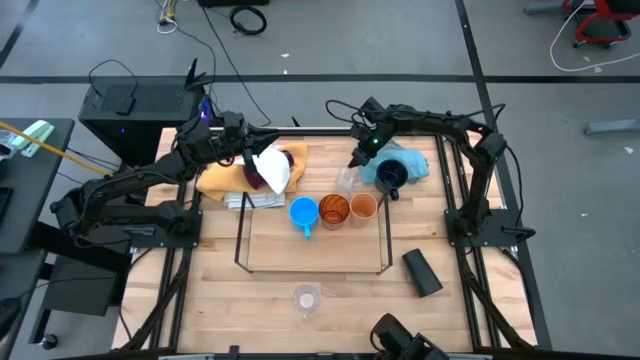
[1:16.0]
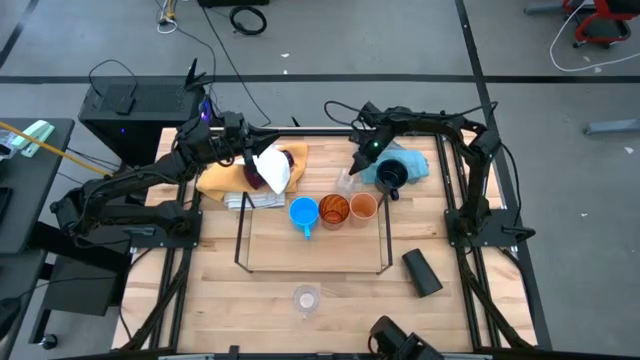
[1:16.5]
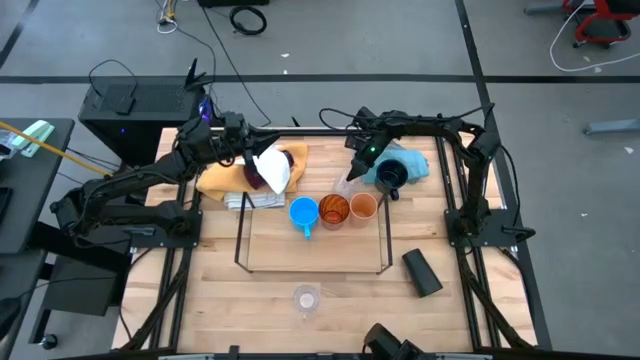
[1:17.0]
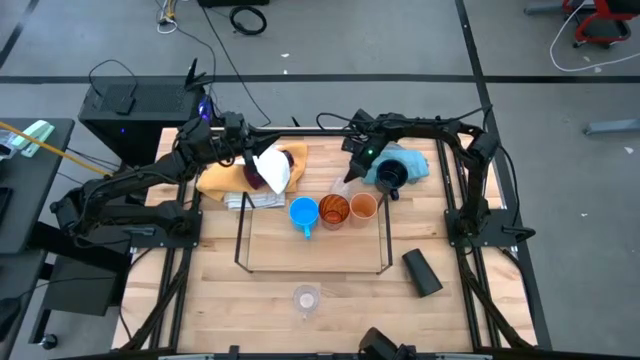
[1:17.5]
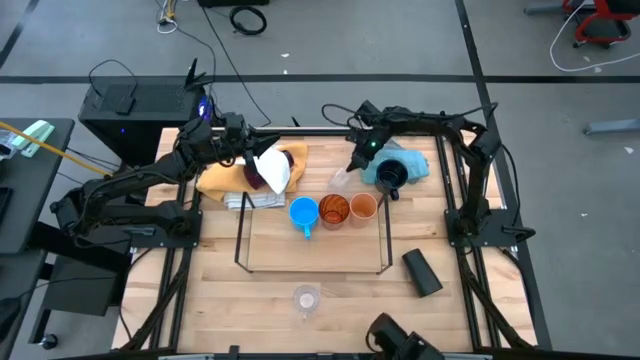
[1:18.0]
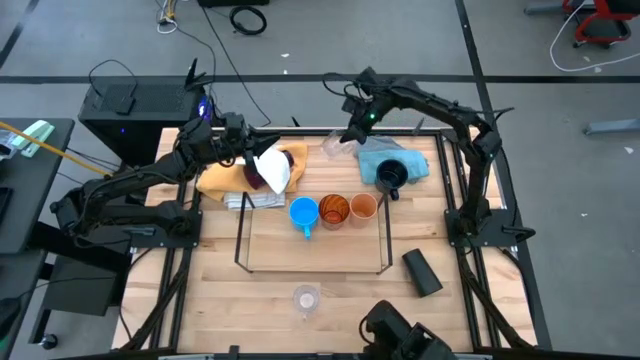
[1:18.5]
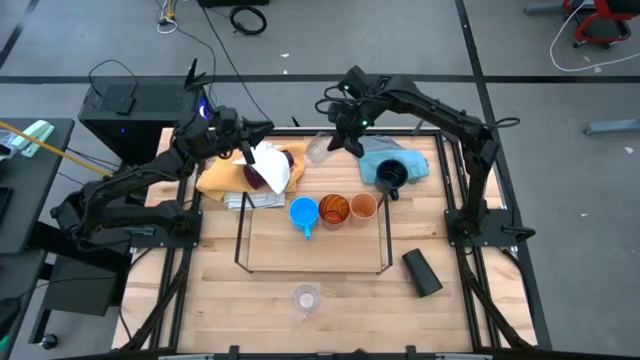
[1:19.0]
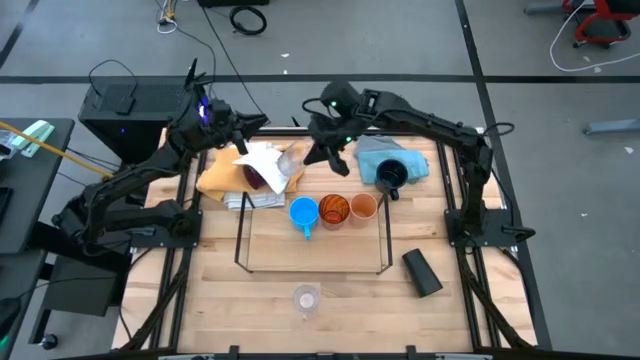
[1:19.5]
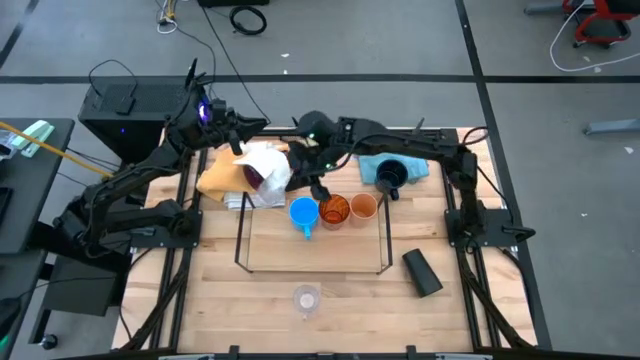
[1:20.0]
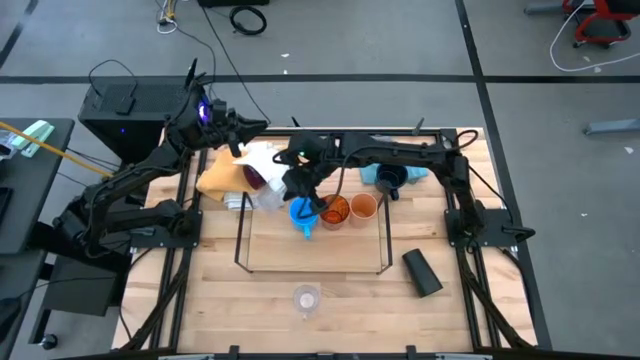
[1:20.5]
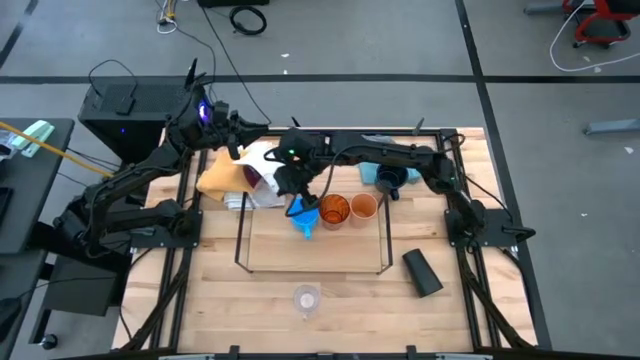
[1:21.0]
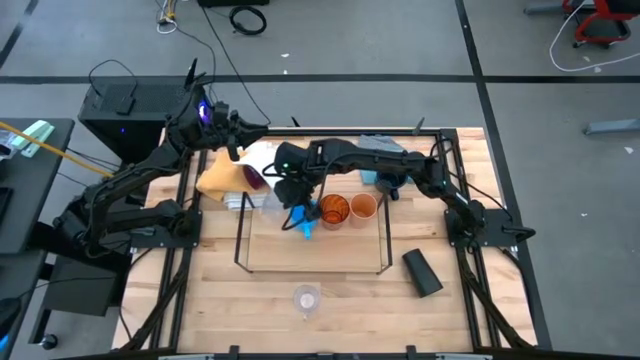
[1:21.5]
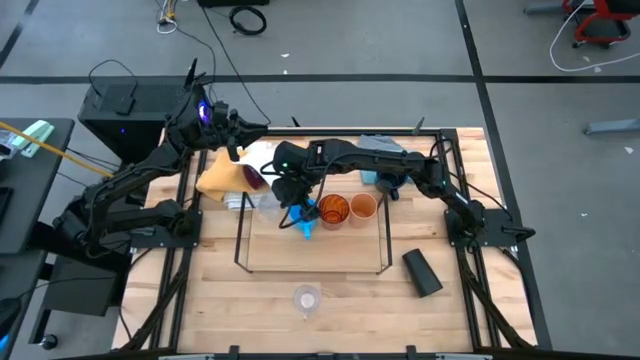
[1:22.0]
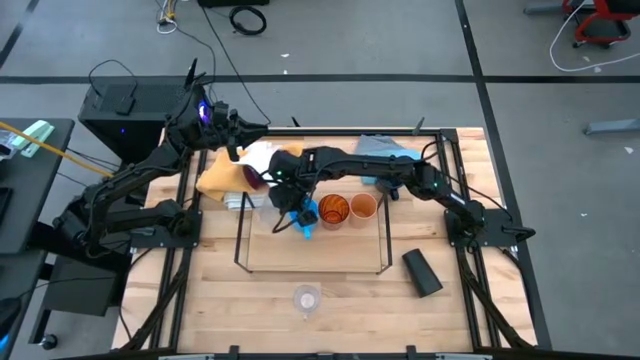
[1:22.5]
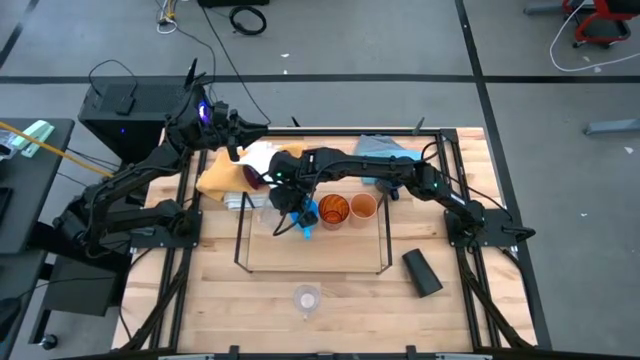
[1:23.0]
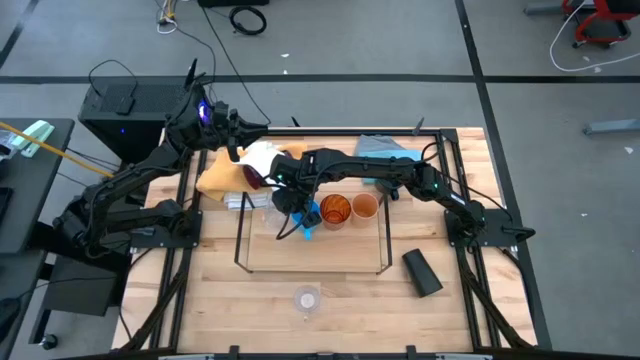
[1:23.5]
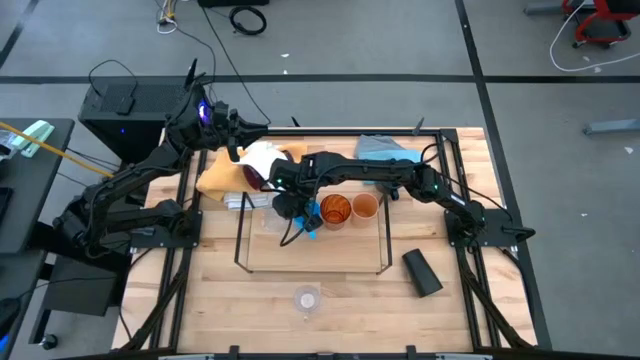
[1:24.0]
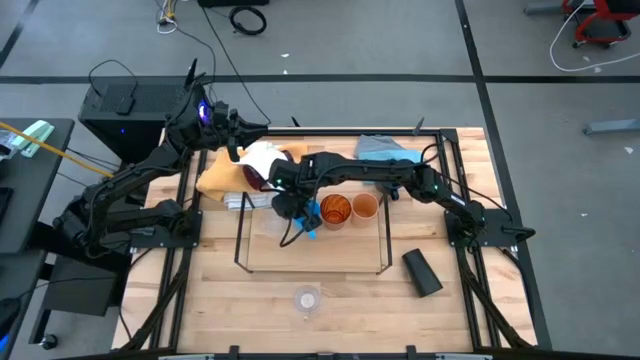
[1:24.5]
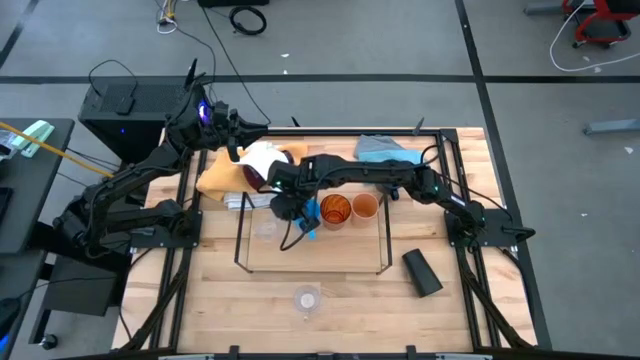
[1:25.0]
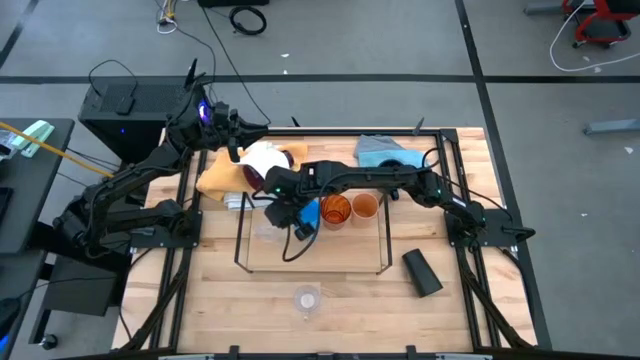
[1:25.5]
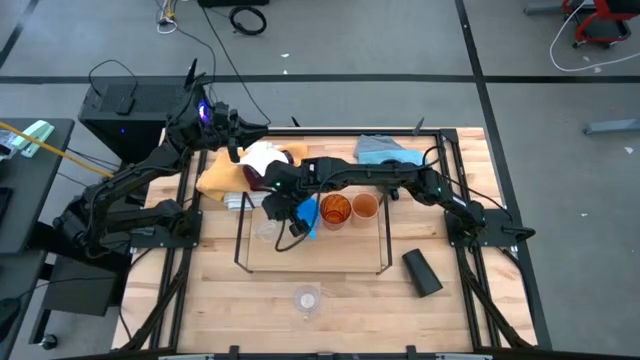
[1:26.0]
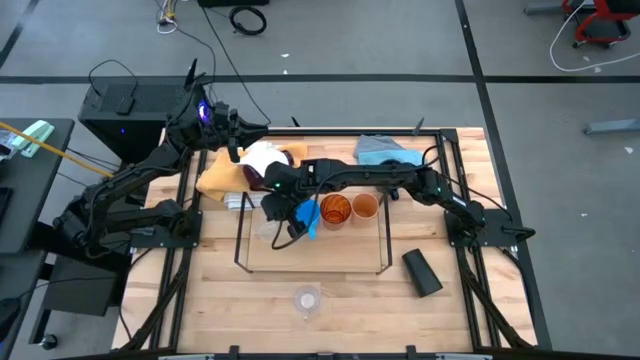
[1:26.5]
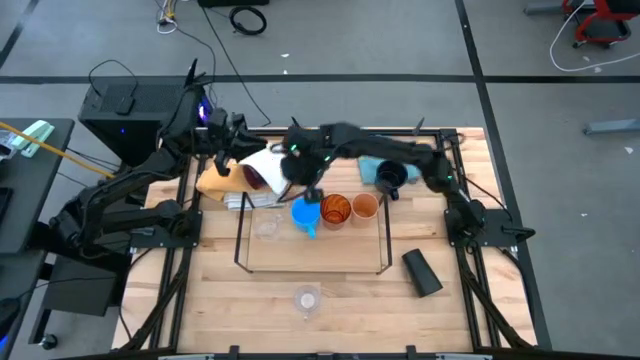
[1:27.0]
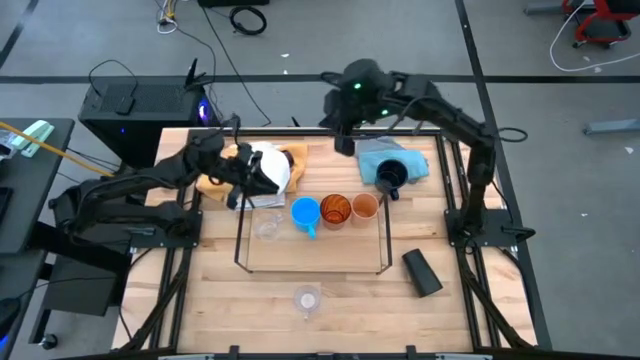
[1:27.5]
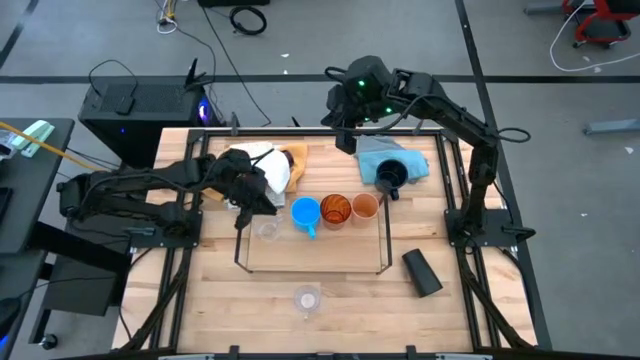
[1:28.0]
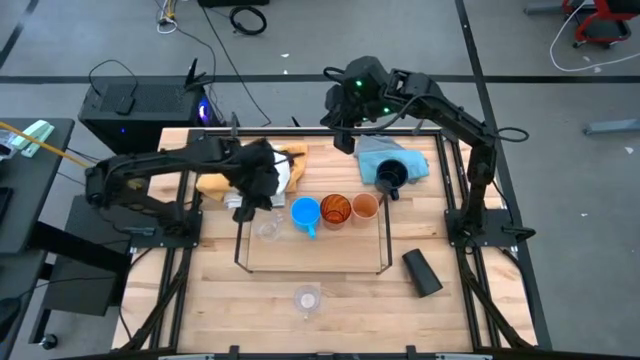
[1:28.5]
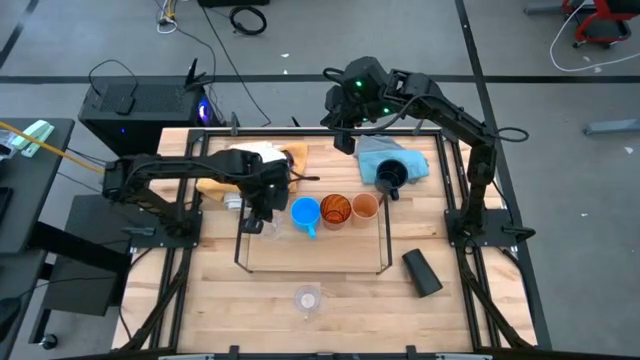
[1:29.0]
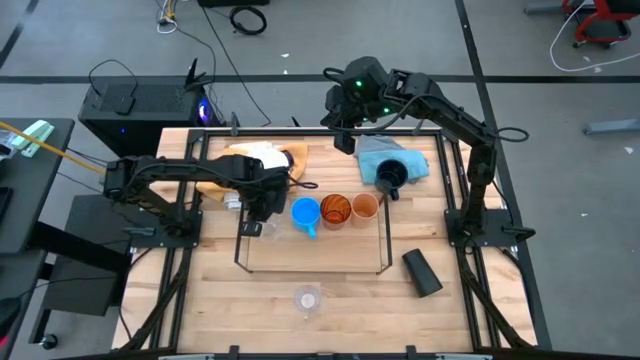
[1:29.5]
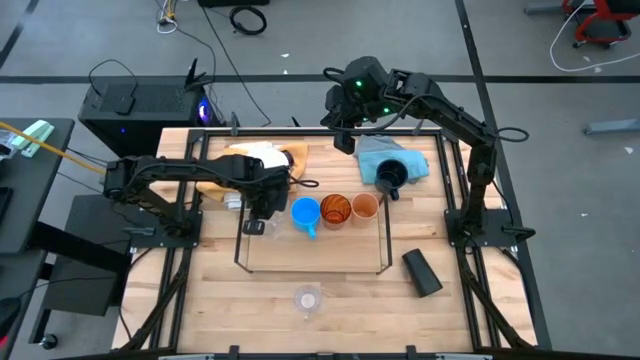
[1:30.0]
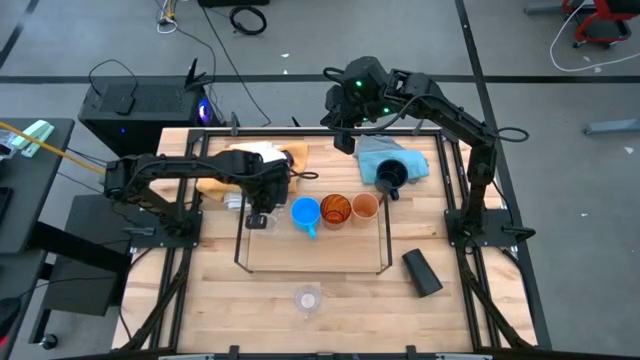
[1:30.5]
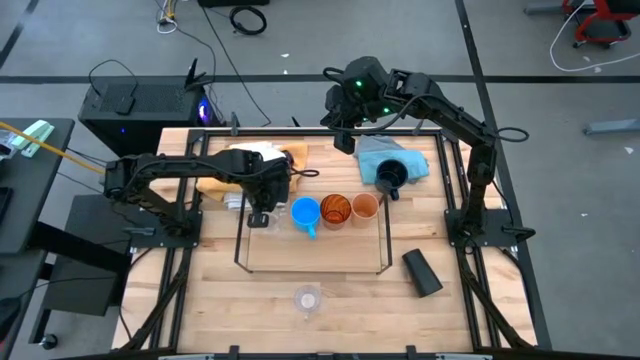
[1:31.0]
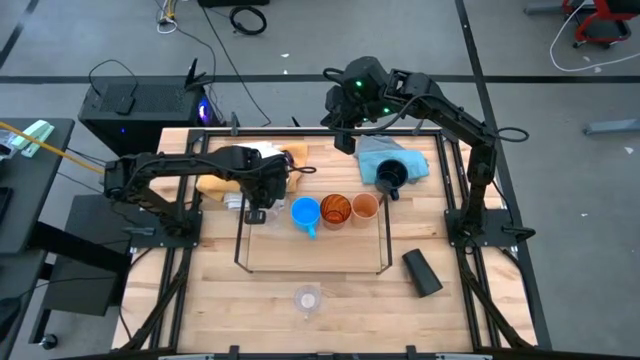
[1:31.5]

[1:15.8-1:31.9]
Task: Stack small to large cups/mugs on shelf
Put the top transparent mug on the shelf

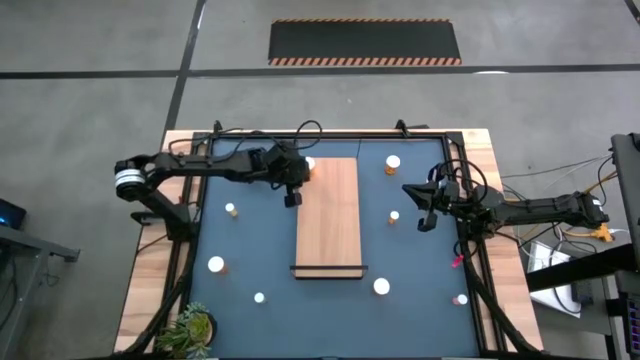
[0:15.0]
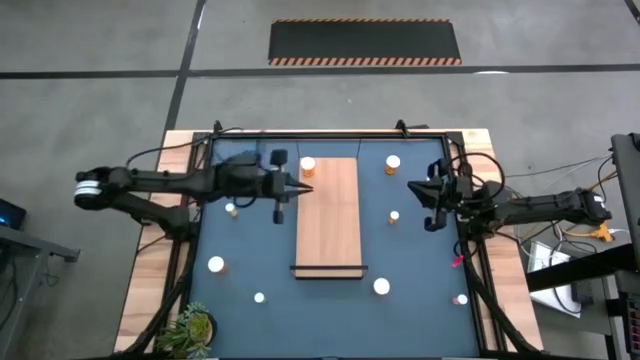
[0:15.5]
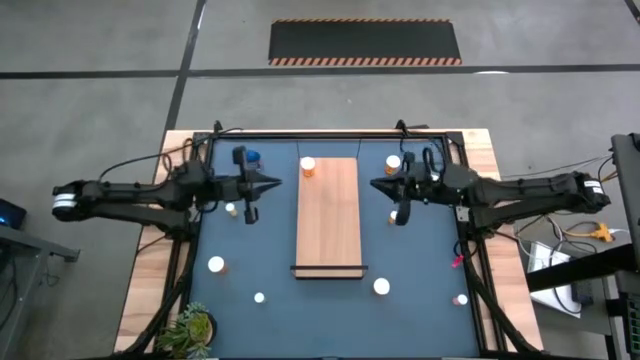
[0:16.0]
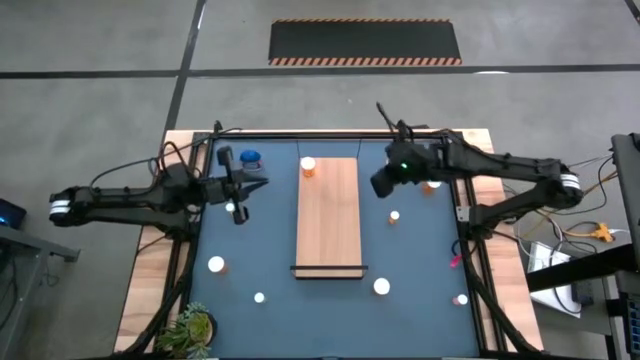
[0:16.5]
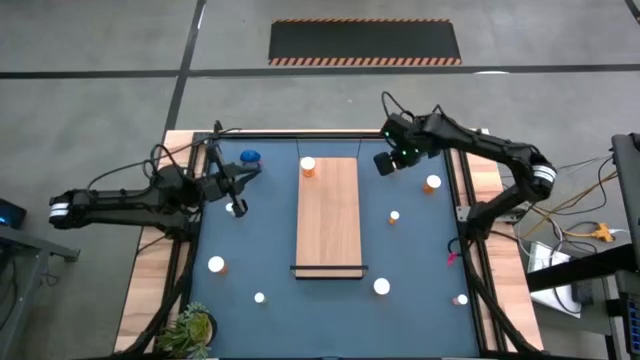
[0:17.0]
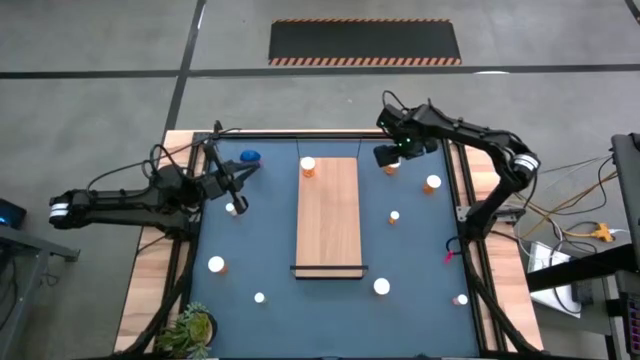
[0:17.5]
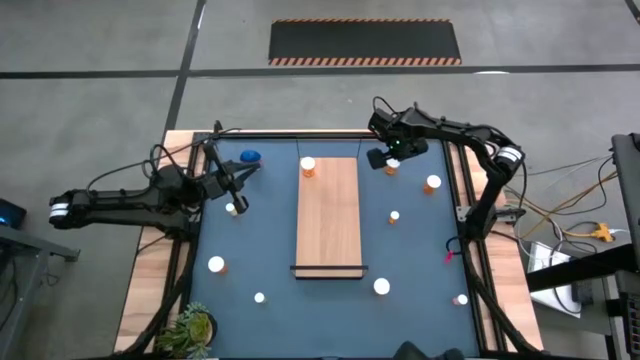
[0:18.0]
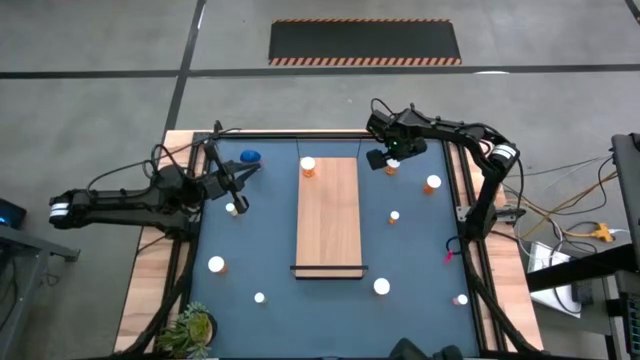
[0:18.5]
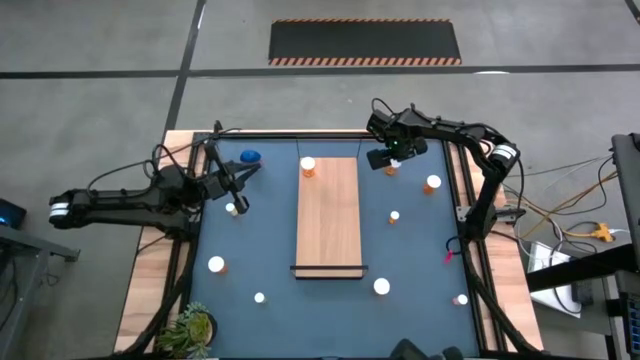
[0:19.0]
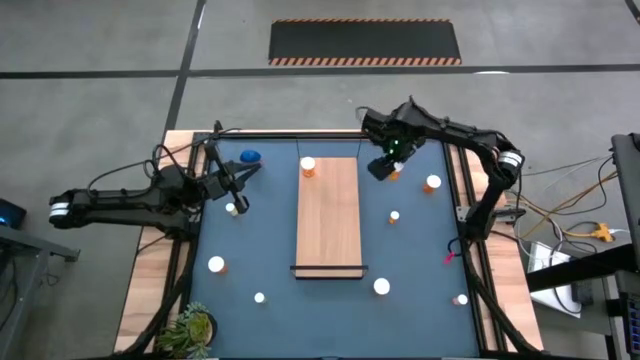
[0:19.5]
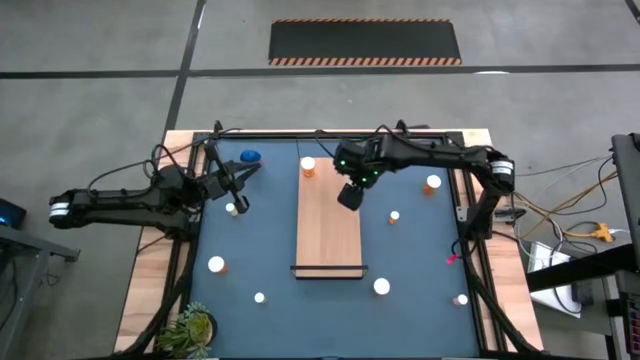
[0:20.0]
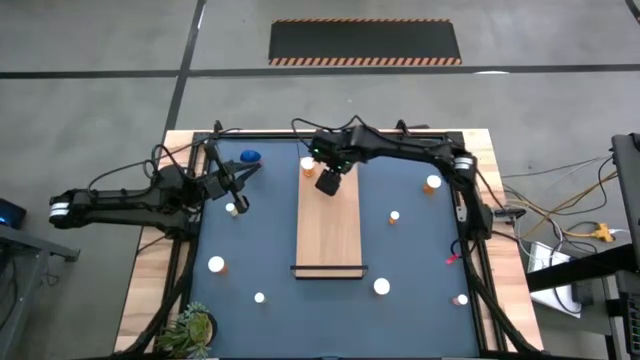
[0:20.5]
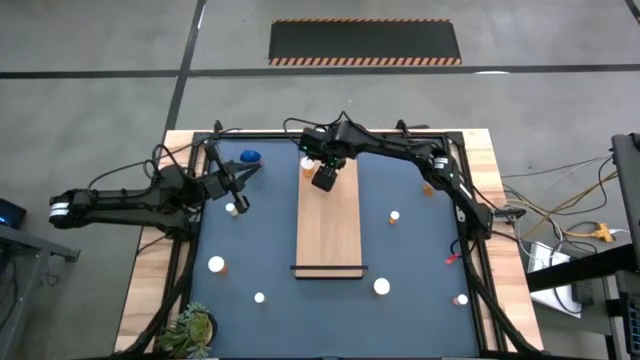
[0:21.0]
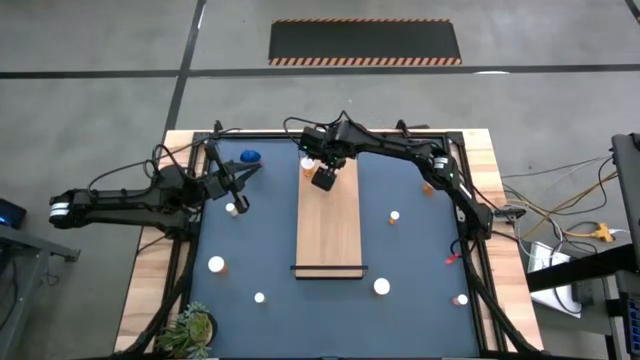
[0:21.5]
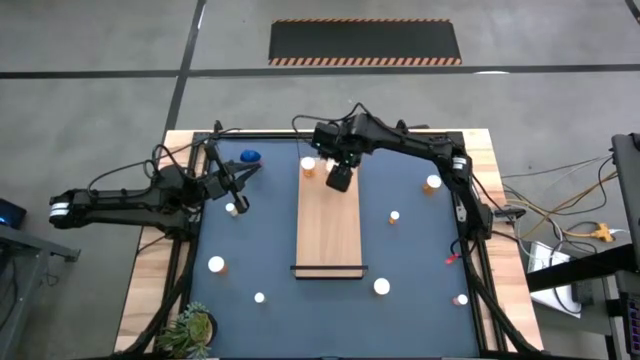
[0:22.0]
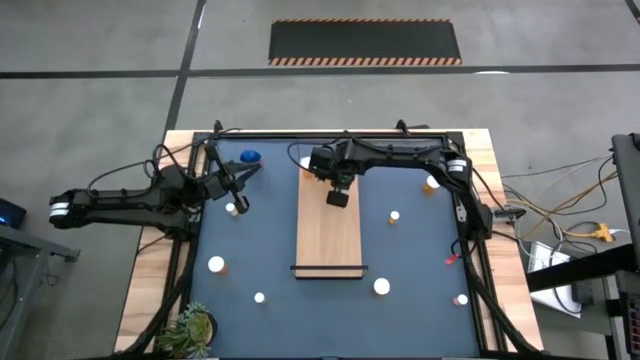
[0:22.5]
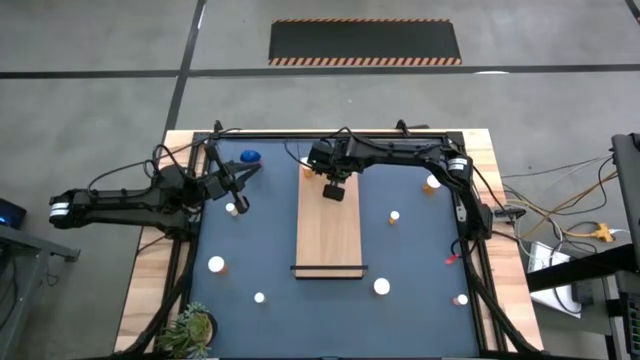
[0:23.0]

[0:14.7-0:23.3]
Task: Pick and place medicine bottles onto shelf by color
Put the big orange pill bottle on the shelf aligned with the big orange pill bottle
